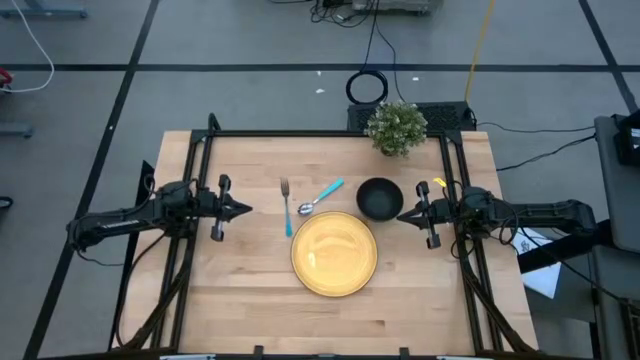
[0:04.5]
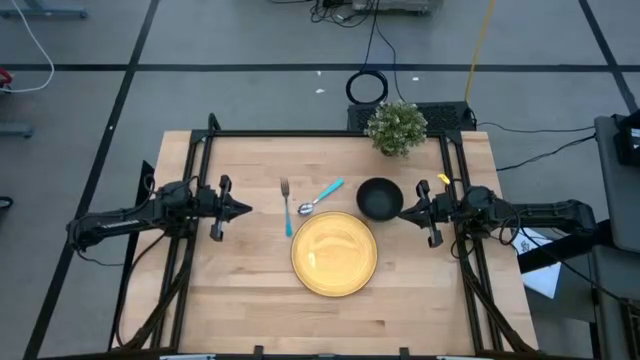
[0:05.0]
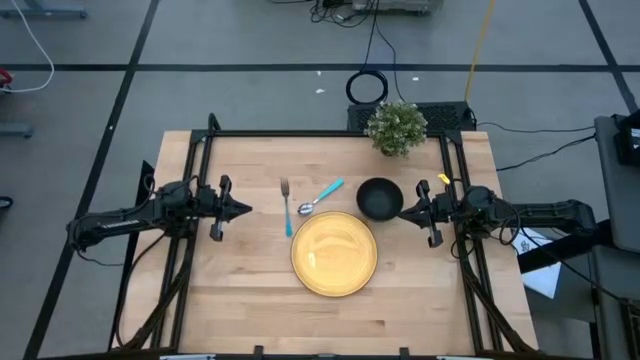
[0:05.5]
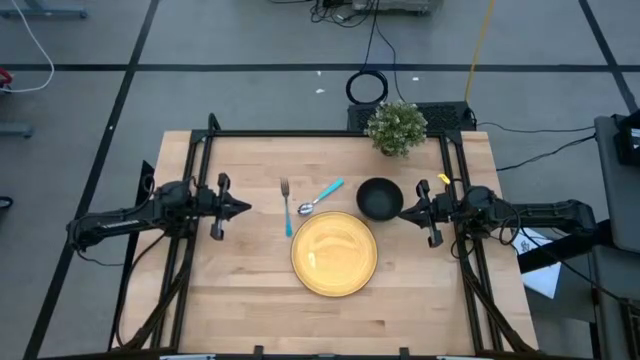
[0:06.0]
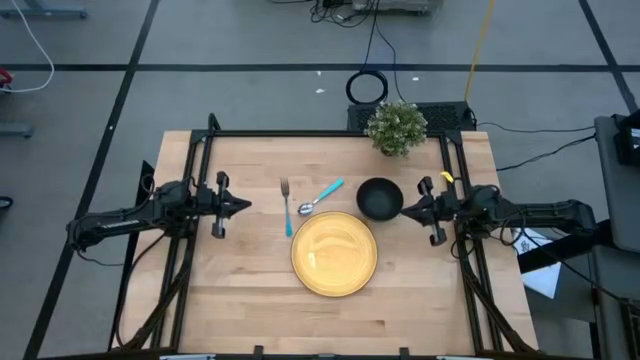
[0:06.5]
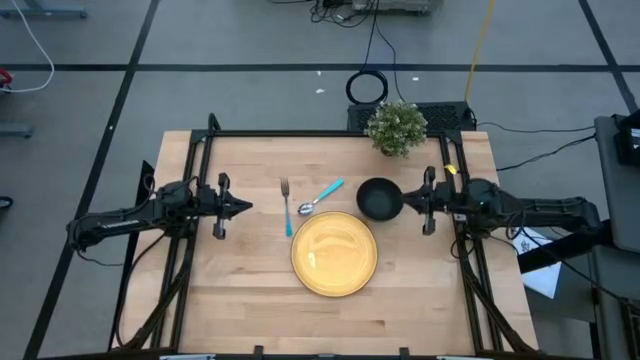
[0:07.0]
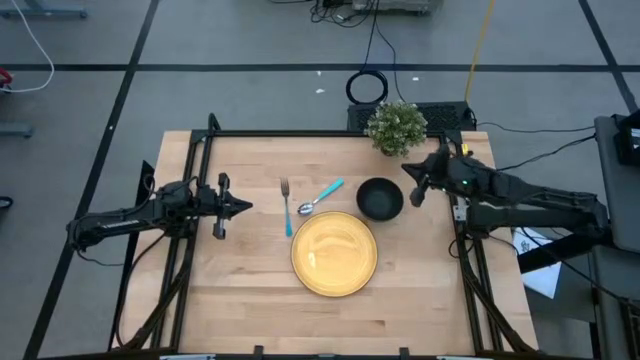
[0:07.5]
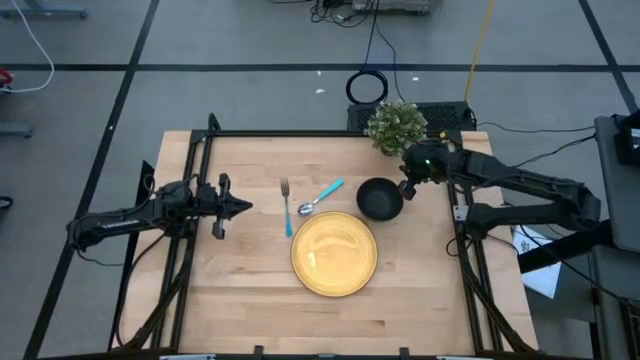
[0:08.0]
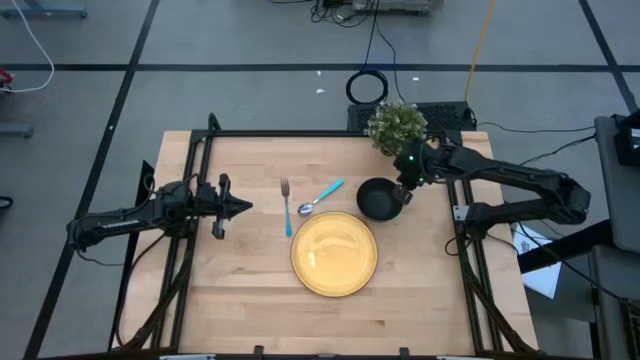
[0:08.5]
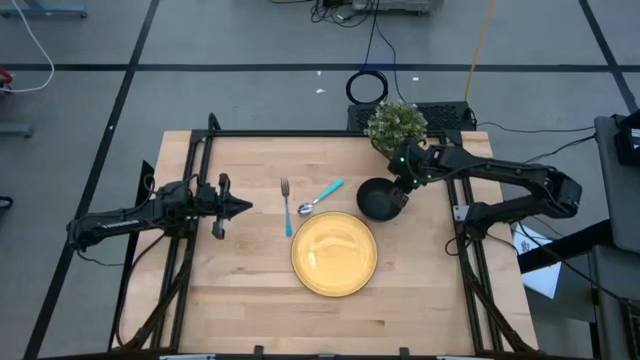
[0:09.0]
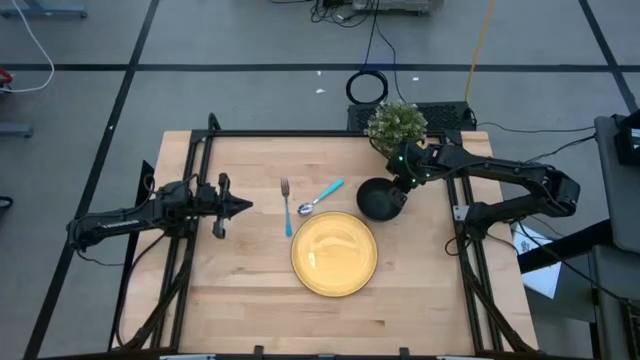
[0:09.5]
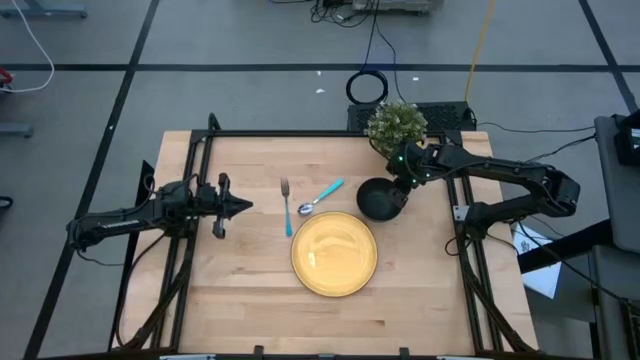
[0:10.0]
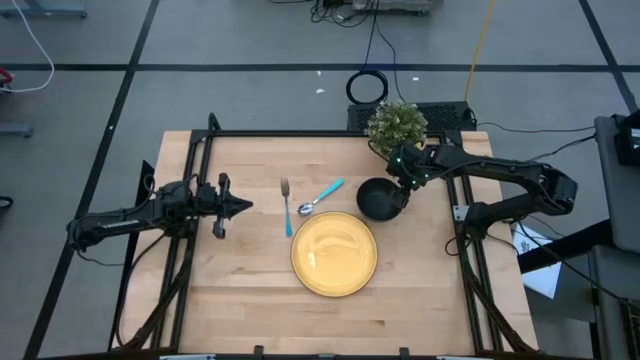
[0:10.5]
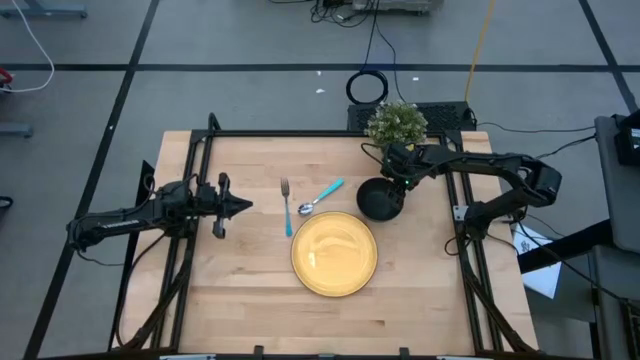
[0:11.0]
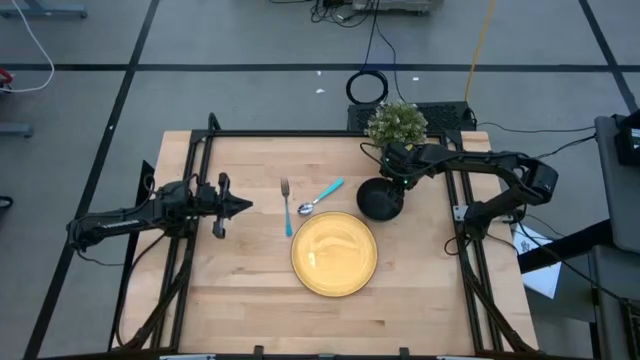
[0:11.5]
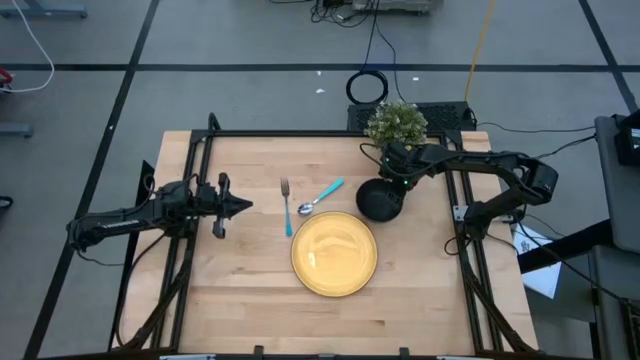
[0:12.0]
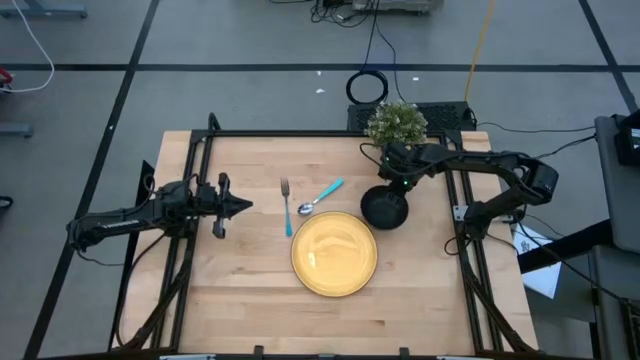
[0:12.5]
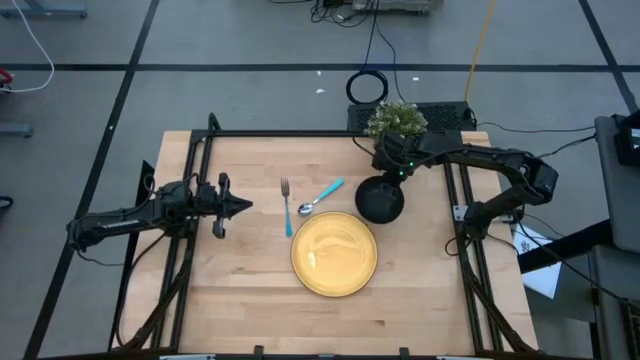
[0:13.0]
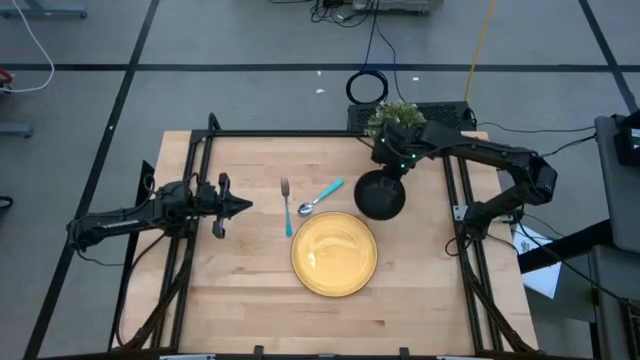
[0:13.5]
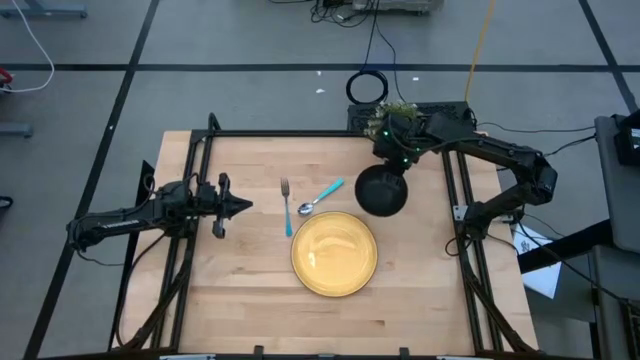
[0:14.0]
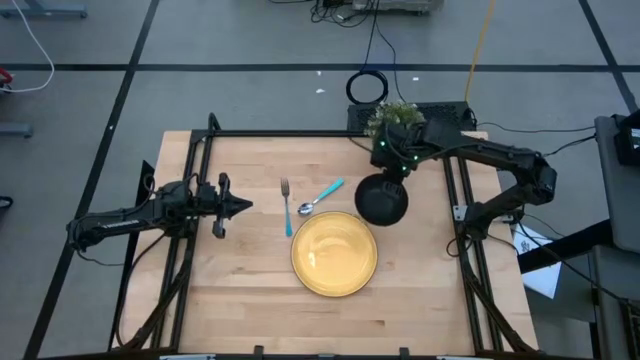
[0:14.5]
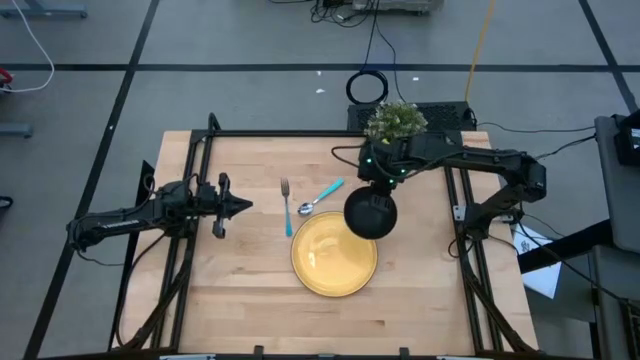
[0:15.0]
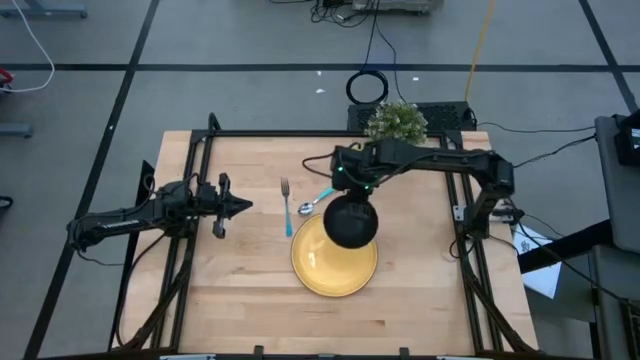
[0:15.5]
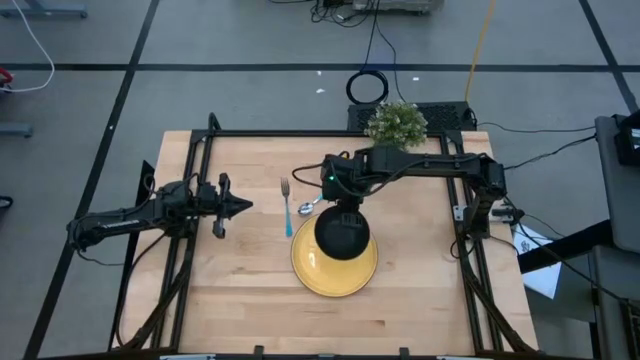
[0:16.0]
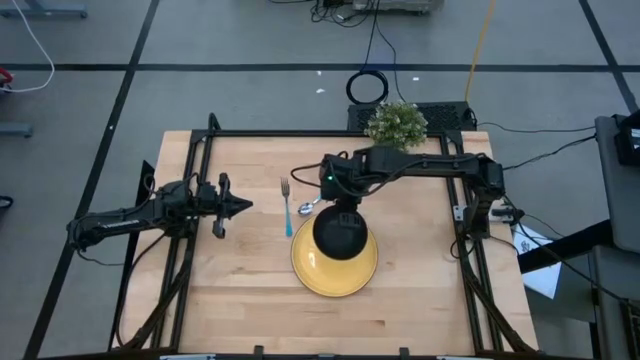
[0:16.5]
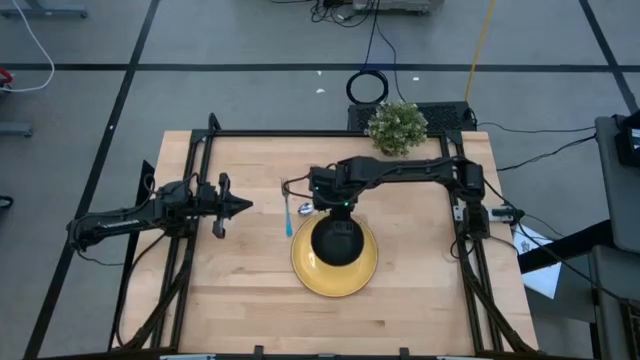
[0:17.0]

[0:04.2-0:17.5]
Task: Set table place
Put the black bowl on top of the yellow plate

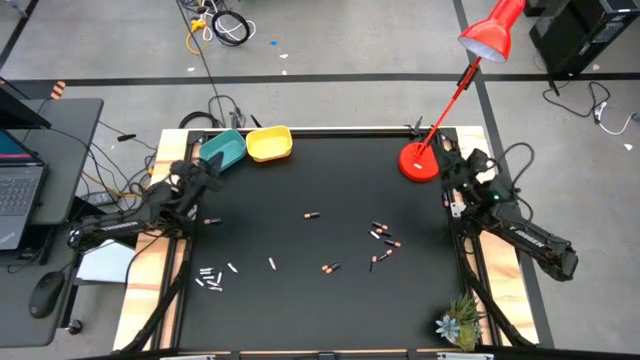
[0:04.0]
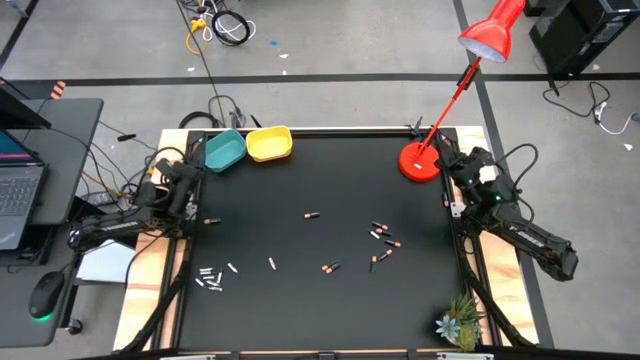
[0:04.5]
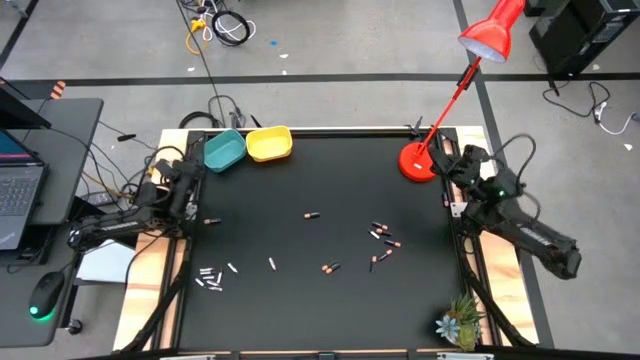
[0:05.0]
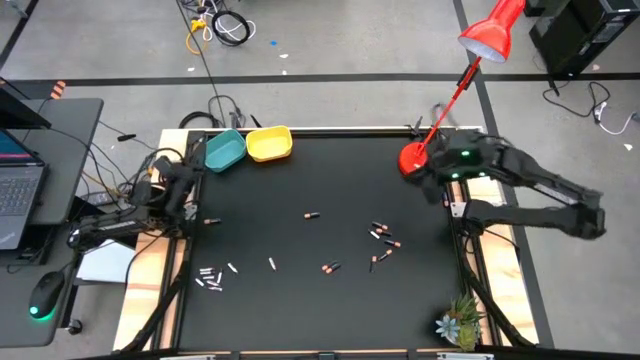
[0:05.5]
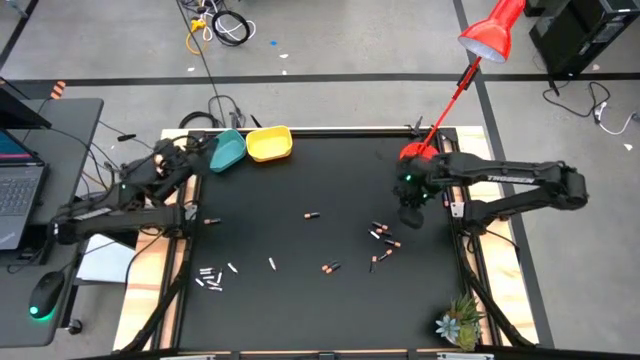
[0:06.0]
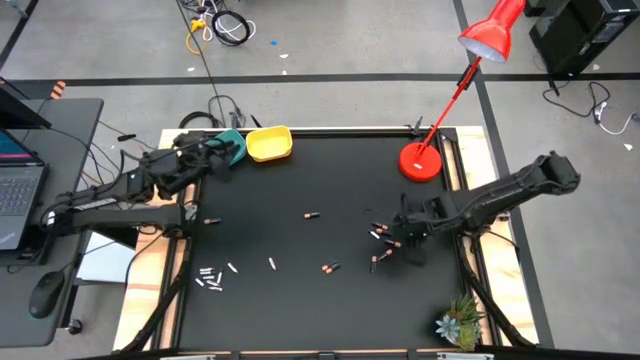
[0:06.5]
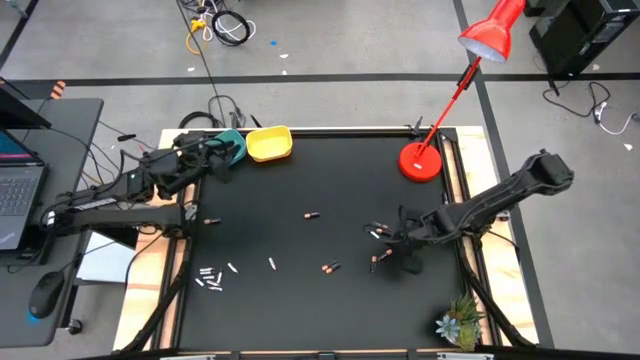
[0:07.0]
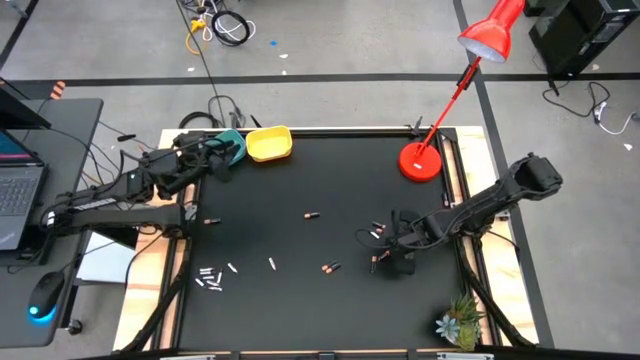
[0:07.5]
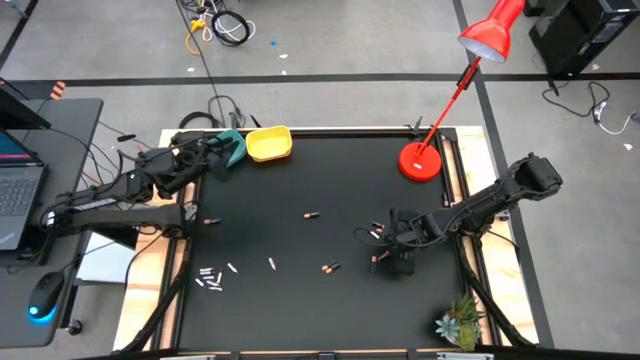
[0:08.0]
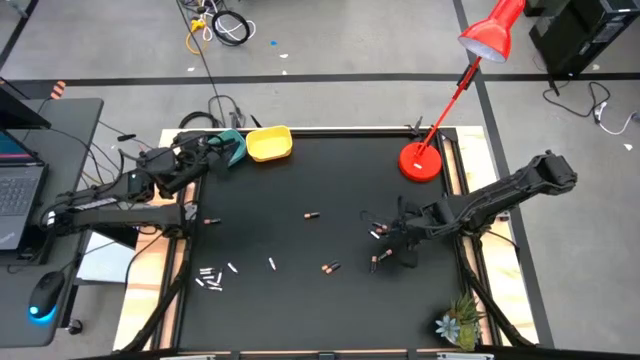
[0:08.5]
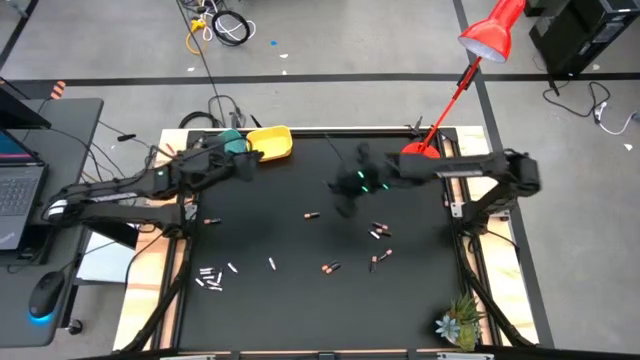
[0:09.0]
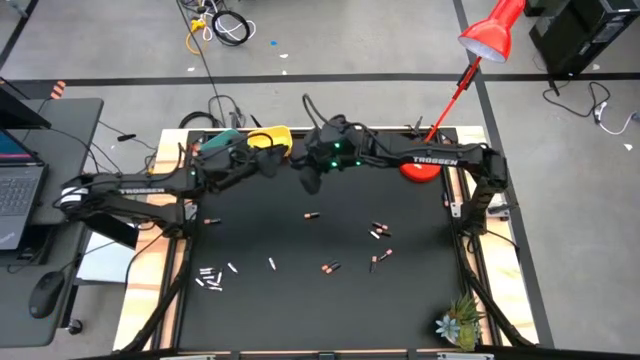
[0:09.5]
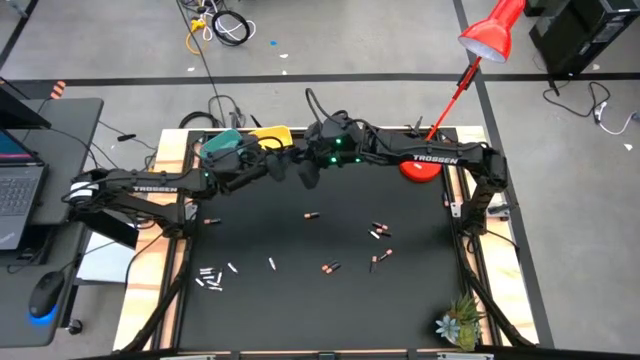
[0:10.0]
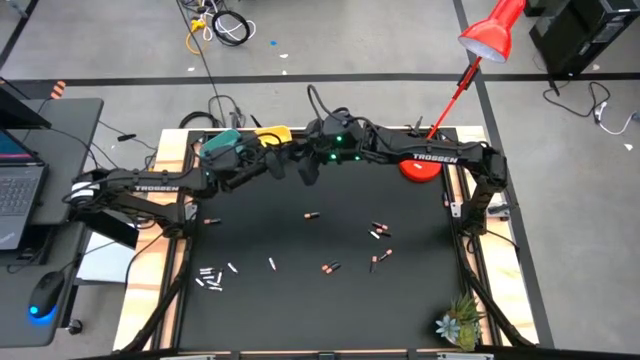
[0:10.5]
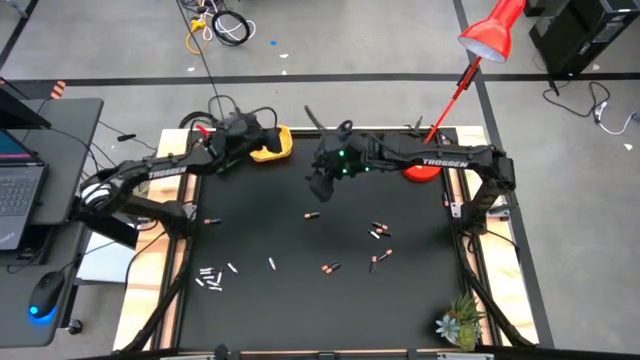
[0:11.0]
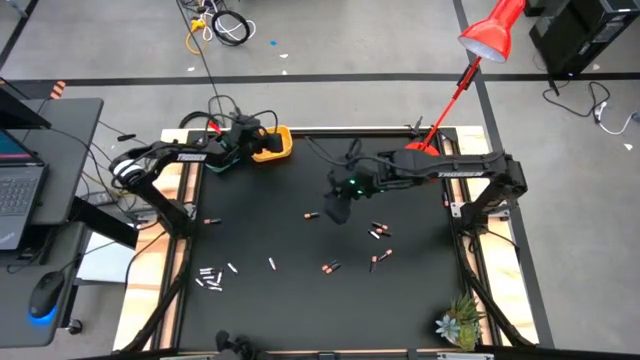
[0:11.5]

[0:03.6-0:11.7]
Task: Sort batteries
Put the black battery into the yellow bin
